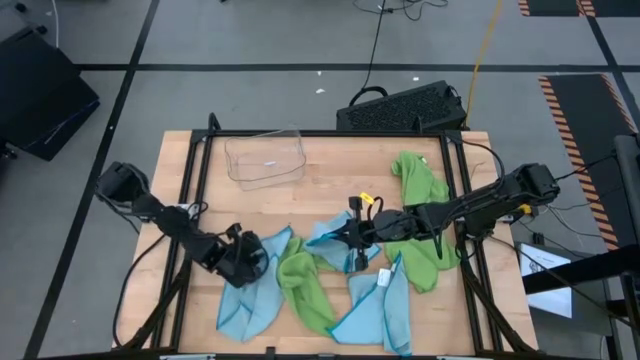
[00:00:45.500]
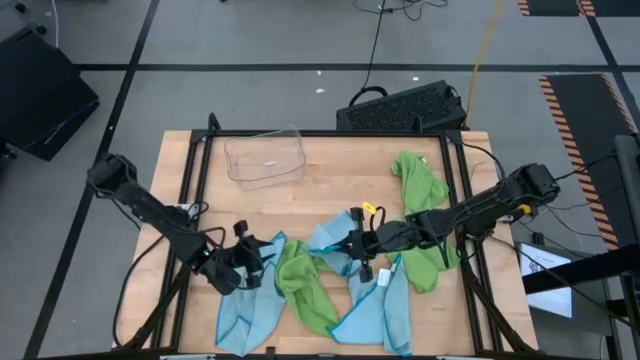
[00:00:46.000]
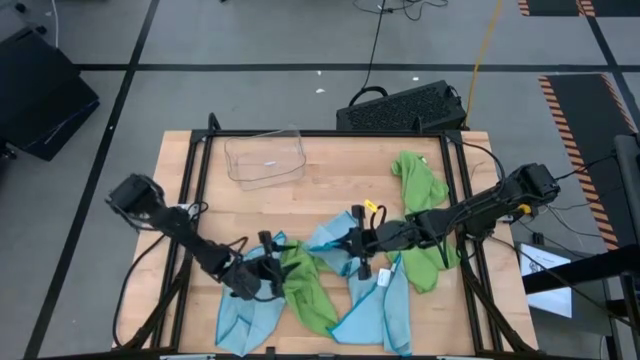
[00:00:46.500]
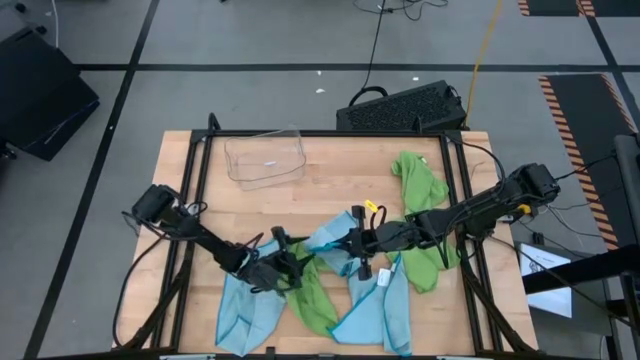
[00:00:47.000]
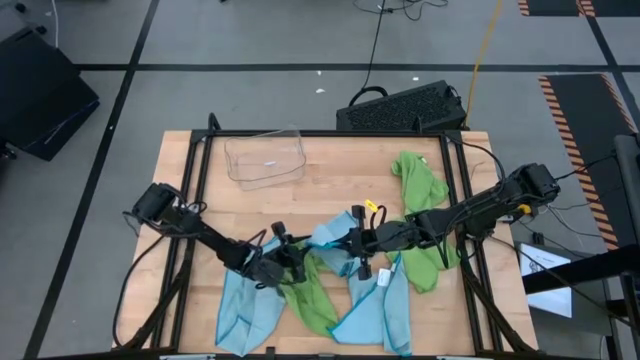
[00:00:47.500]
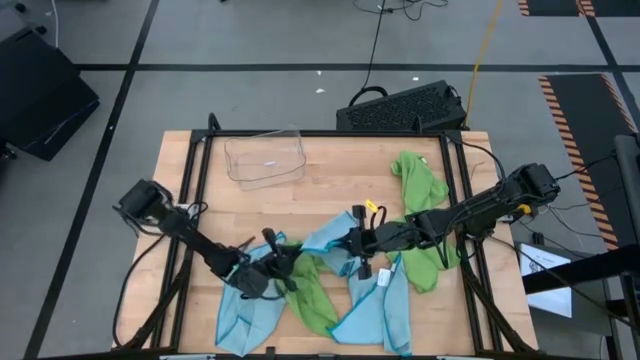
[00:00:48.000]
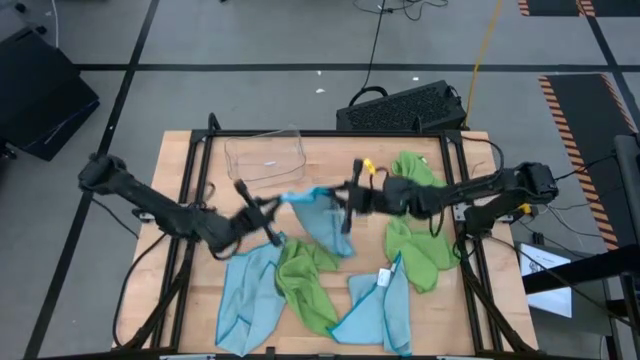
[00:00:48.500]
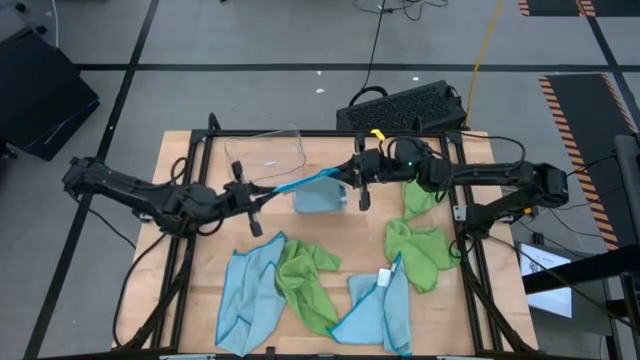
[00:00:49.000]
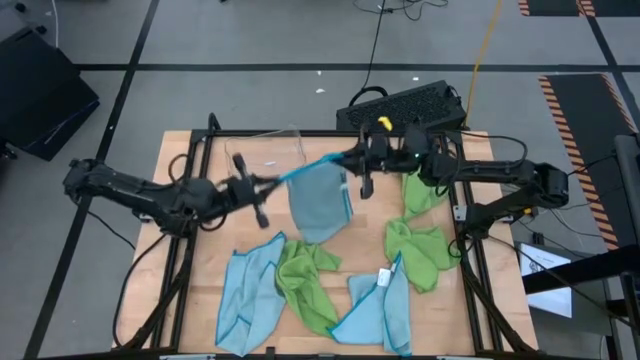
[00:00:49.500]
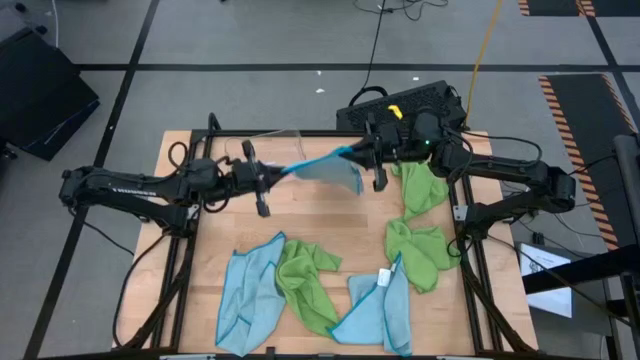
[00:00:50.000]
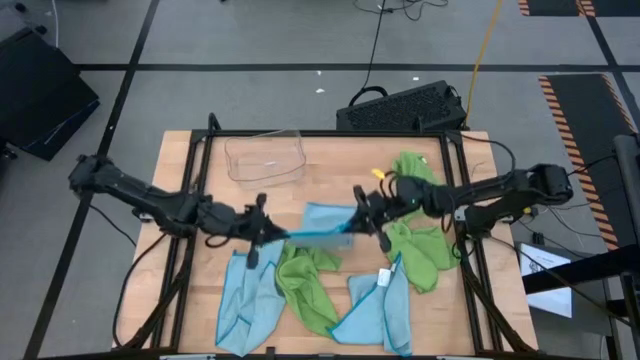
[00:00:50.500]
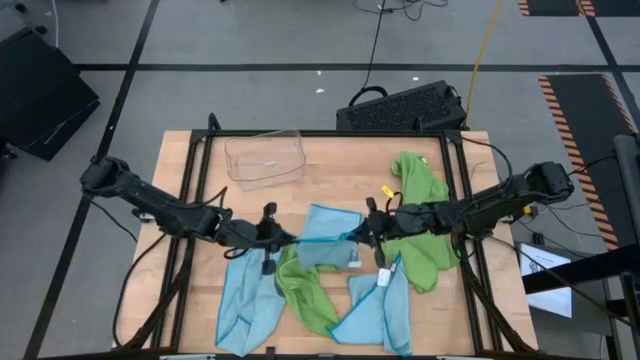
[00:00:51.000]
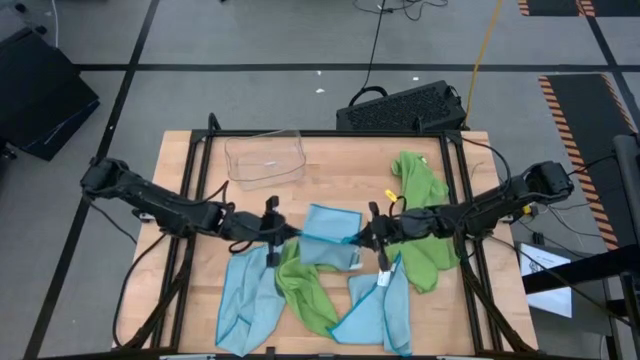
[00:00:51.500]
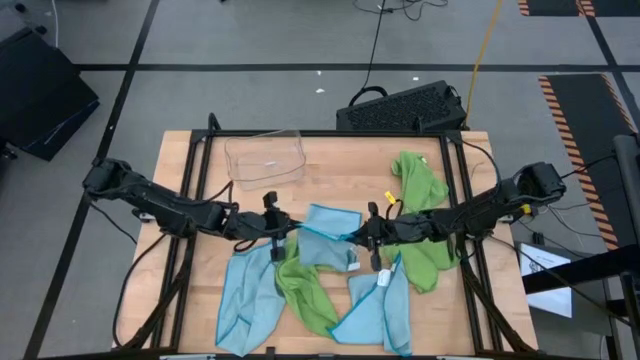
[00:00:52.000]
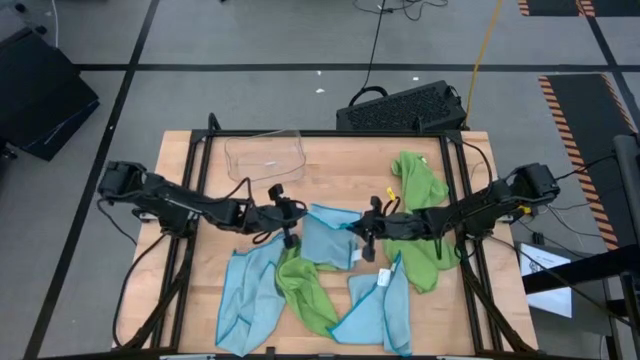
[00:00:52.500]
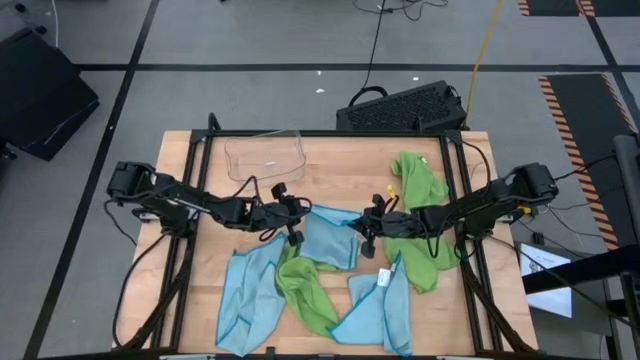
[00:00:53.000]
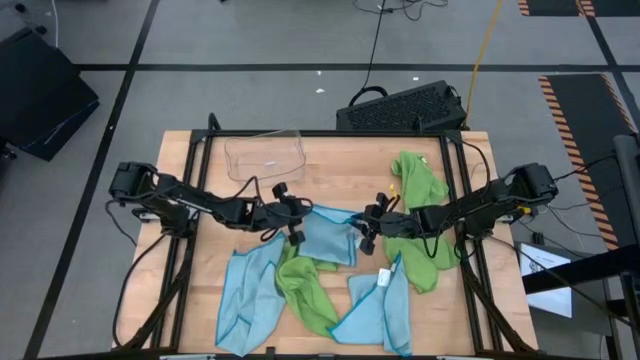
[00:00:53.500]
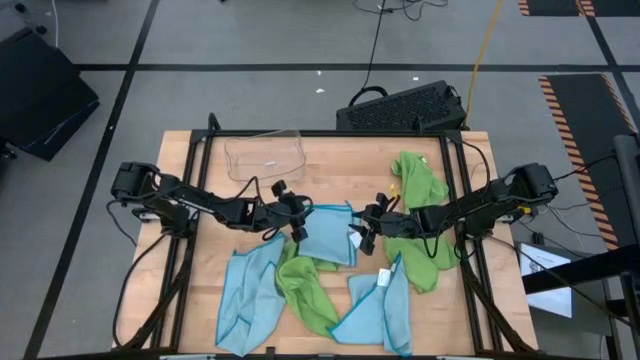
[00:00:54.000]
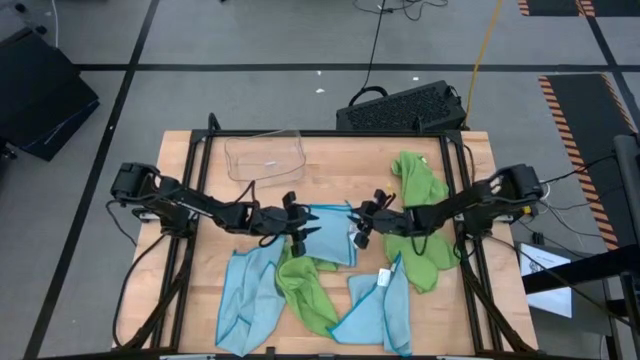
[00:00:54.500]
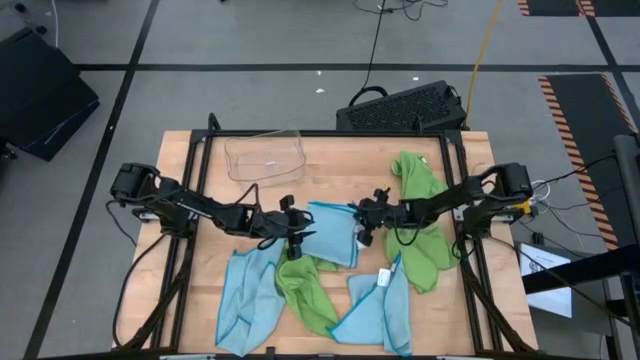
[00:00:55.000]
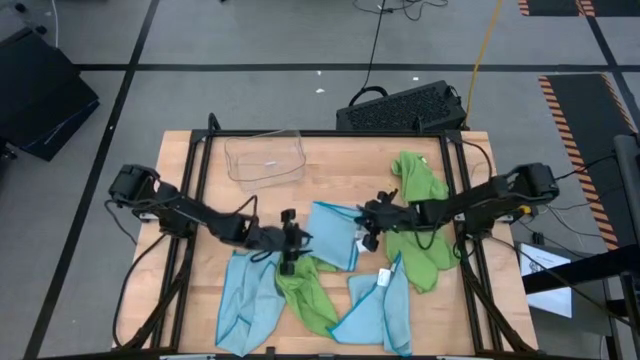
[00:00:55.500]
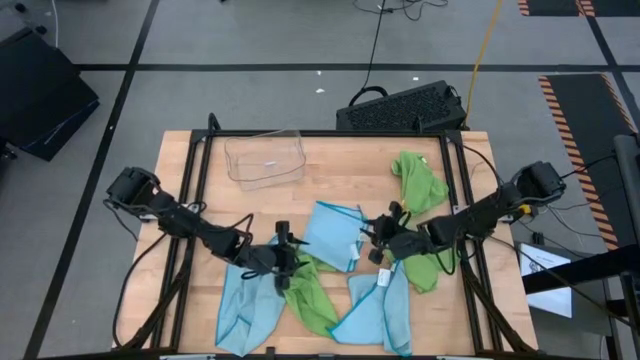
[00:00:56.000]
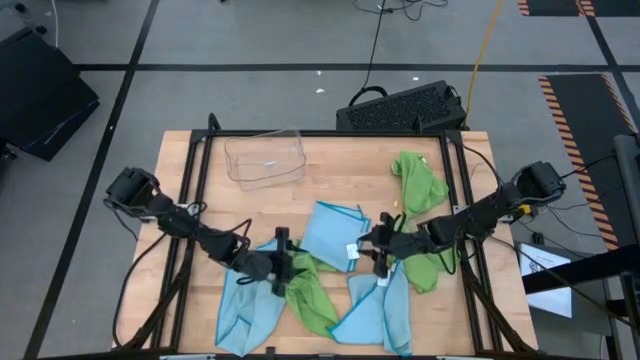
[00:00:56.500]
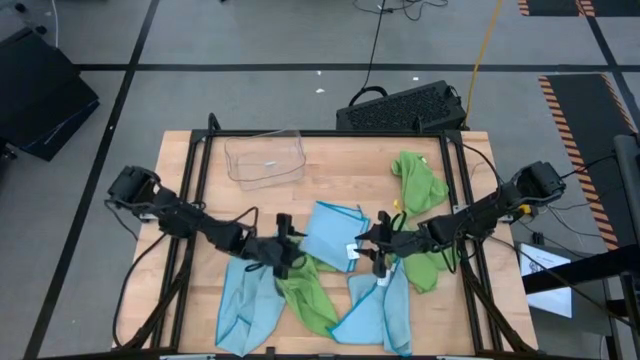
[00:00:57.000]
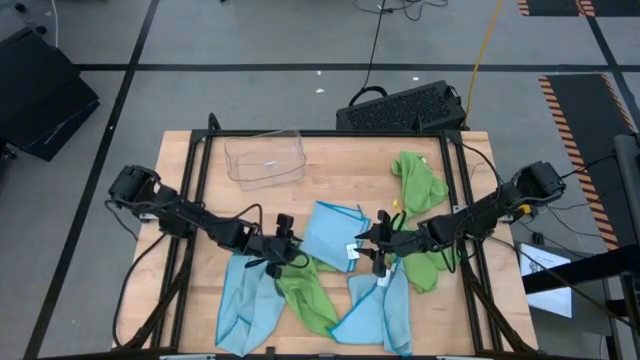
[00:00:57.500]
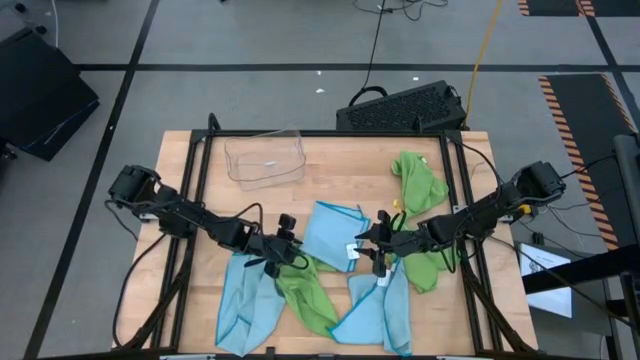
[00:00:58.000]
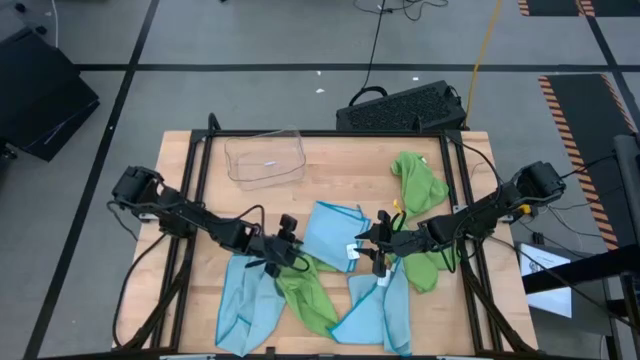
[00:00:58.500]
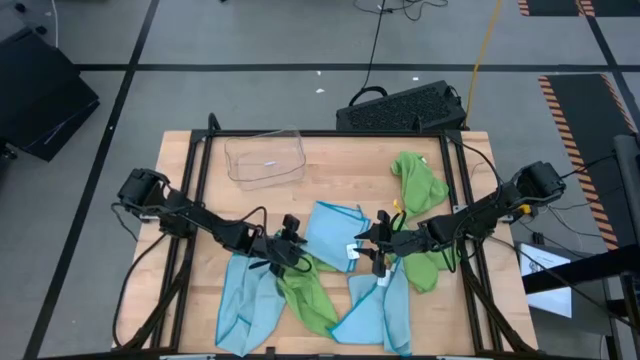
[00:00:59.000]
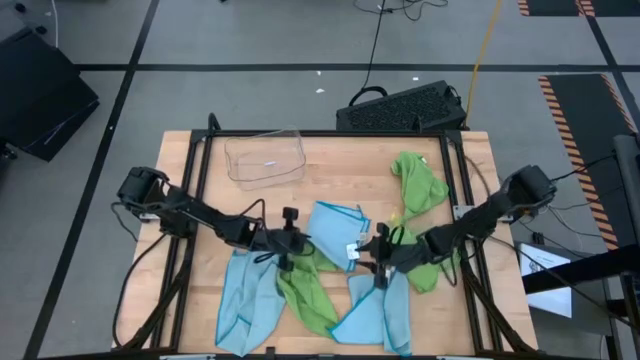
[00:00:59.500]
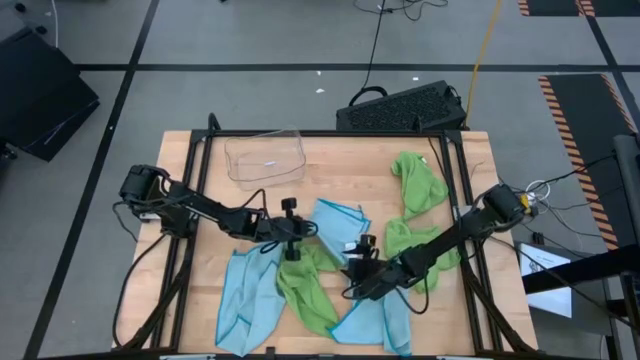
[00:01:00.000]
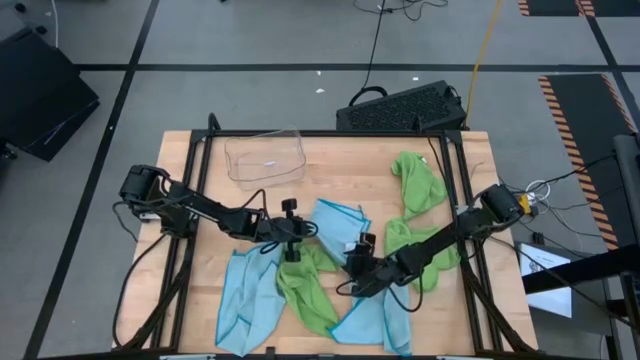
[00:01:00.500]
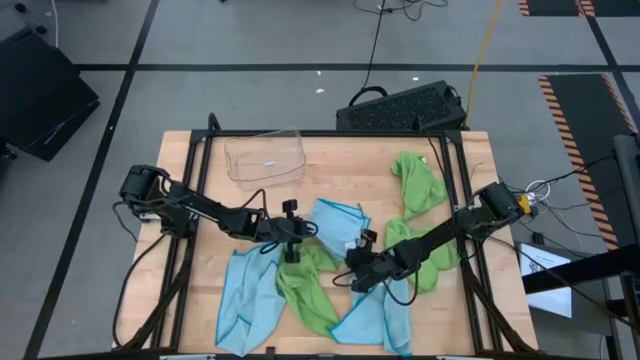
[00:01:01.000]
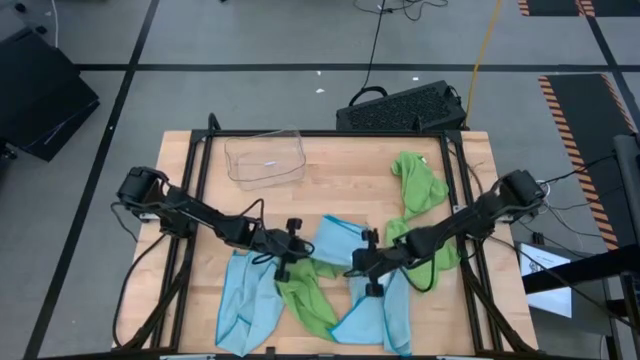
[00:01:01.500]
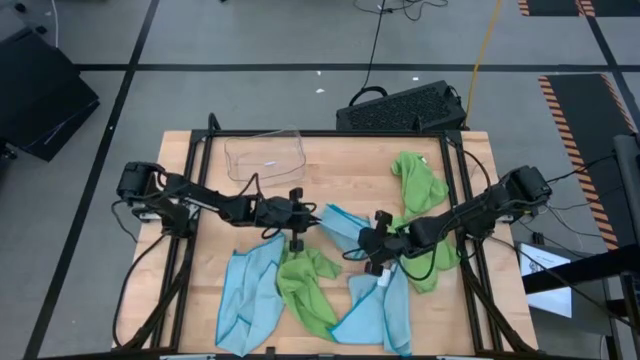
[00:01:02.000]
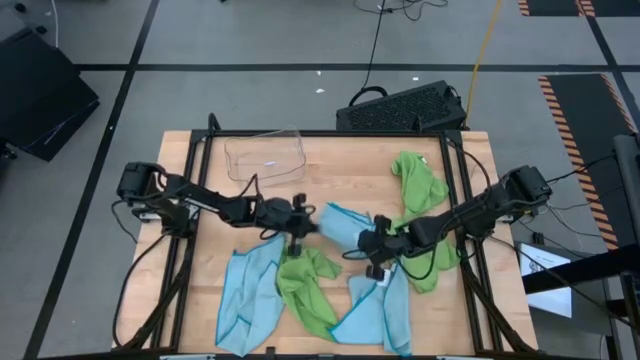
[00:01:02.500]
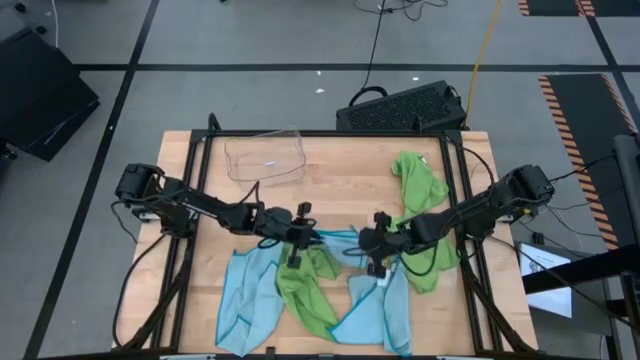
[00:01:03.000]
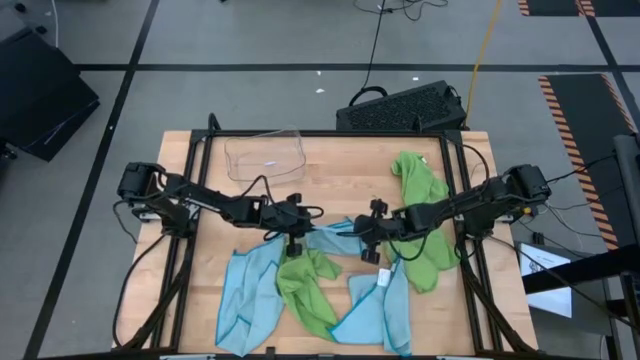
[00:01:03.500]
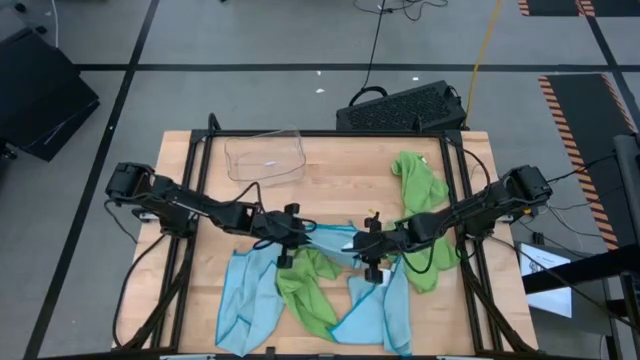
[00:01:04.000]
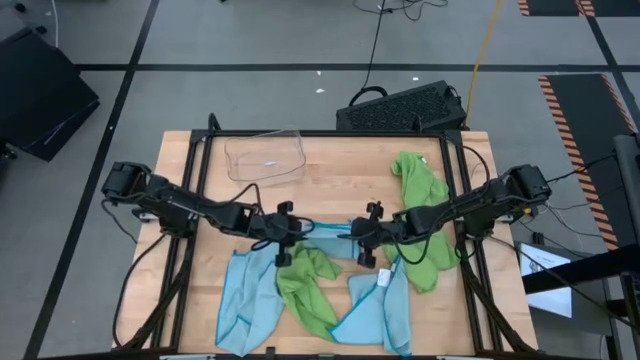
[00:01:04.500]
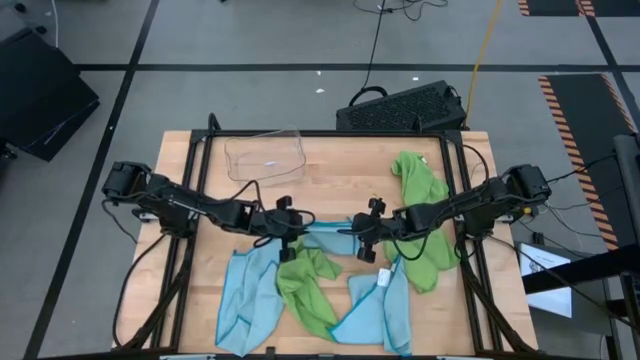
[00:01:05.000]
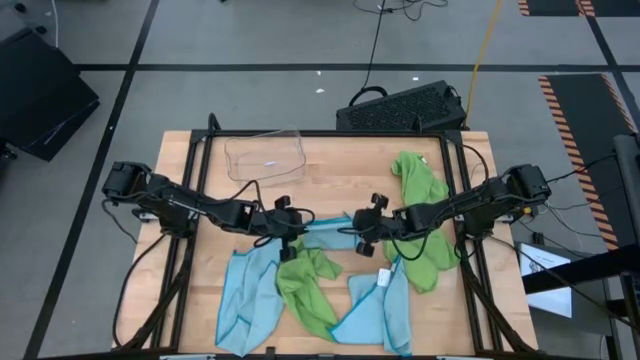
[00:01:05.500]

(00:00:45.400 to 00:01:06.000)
Task: Fold microfiber towels
Fold the top center blue microfiber cloth
